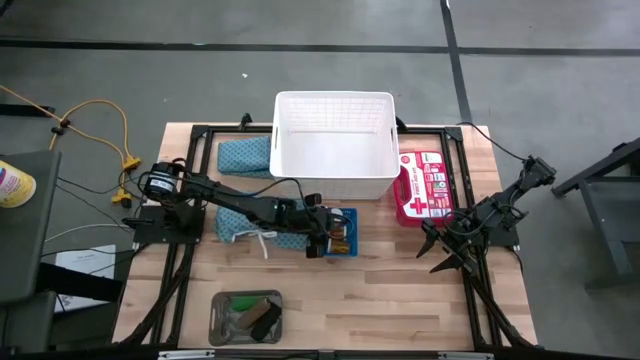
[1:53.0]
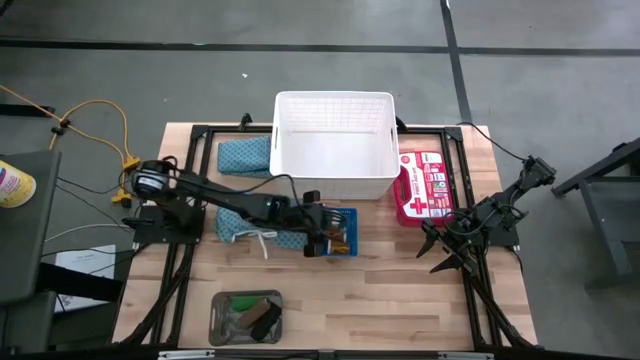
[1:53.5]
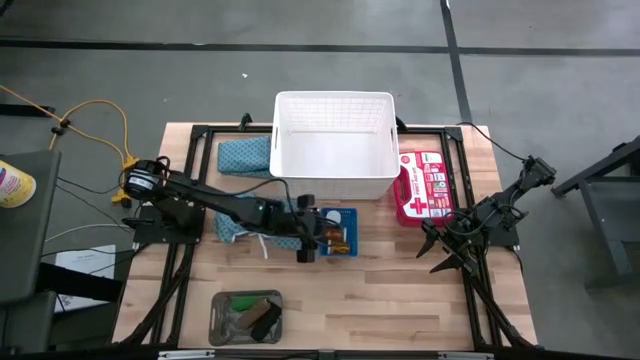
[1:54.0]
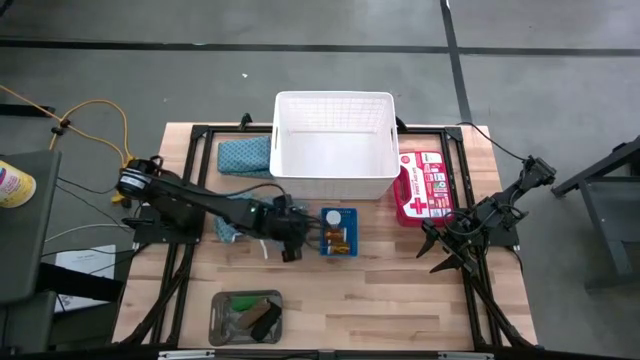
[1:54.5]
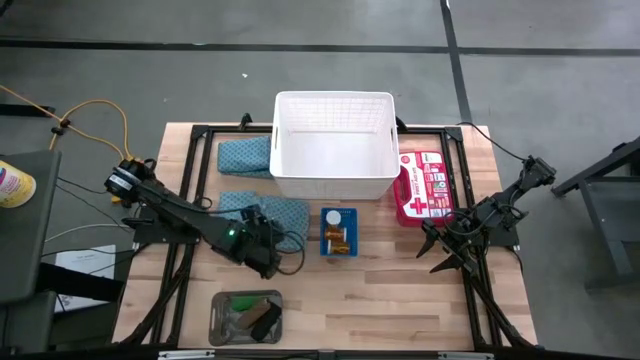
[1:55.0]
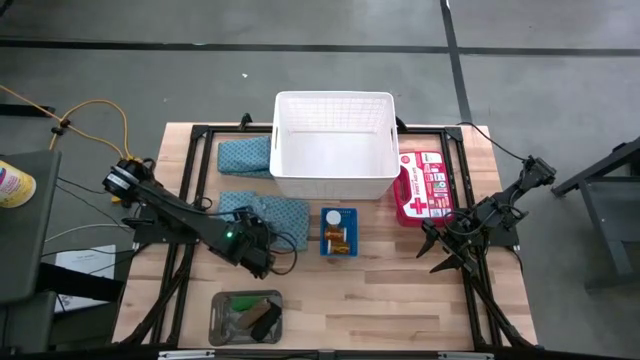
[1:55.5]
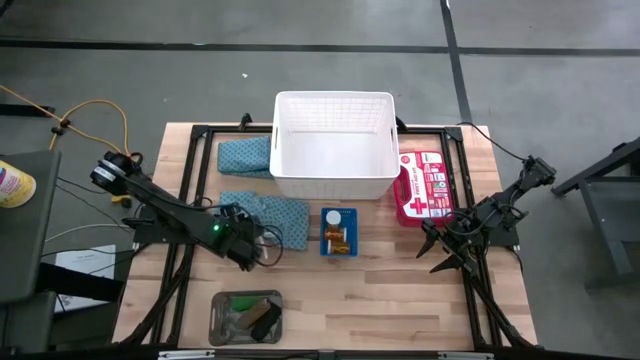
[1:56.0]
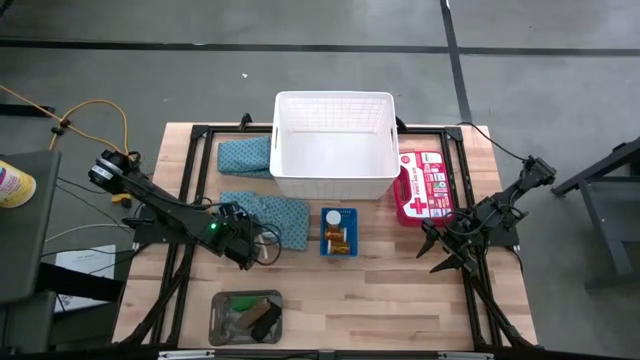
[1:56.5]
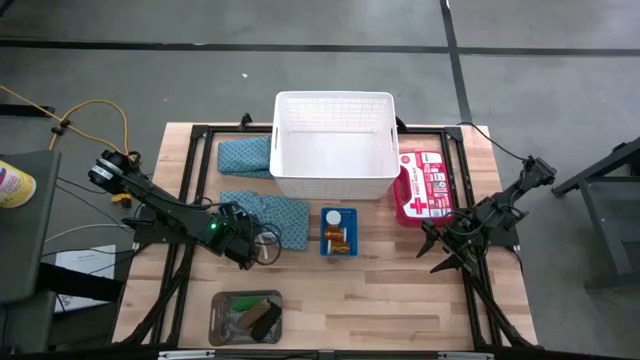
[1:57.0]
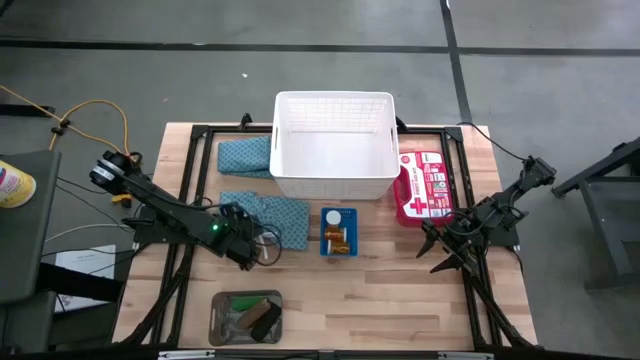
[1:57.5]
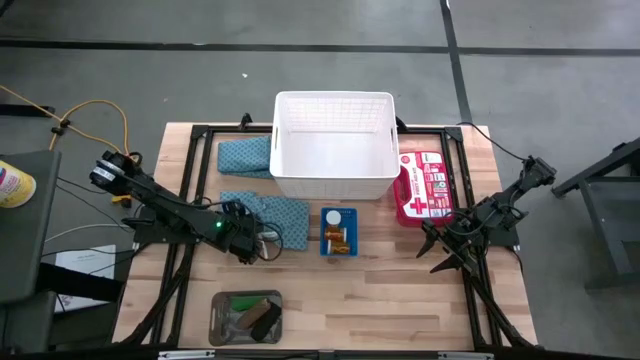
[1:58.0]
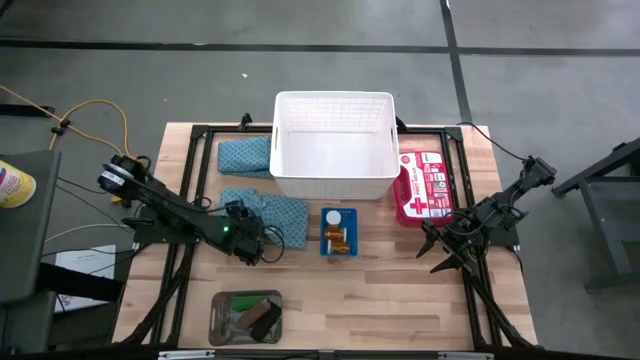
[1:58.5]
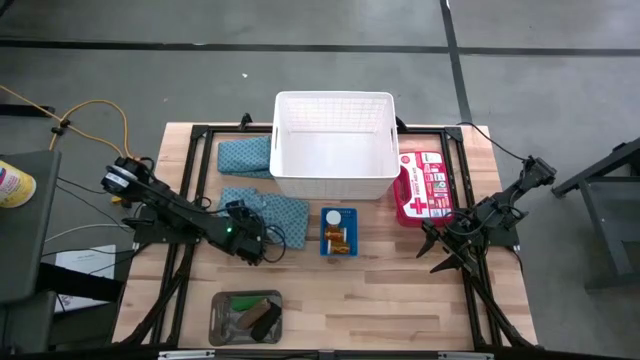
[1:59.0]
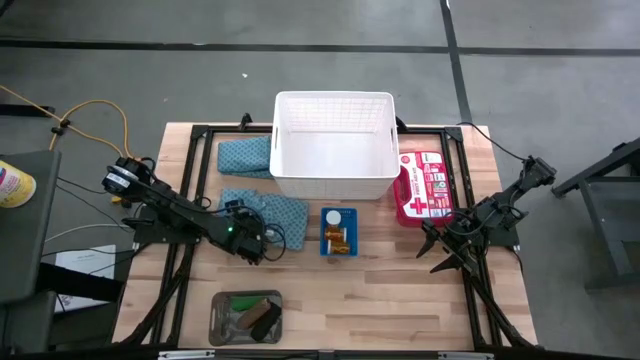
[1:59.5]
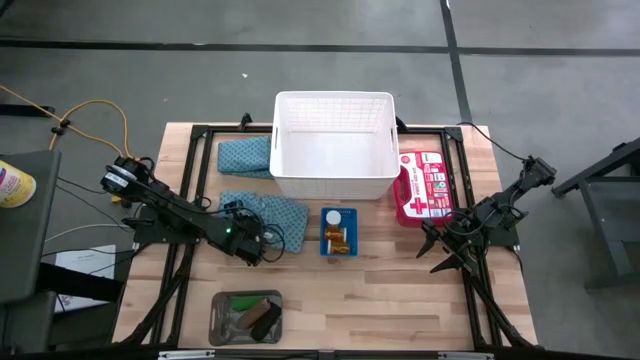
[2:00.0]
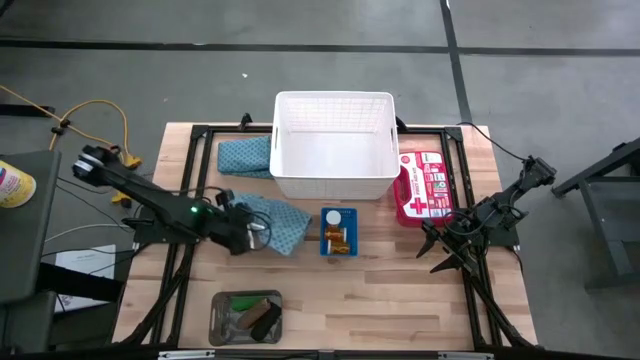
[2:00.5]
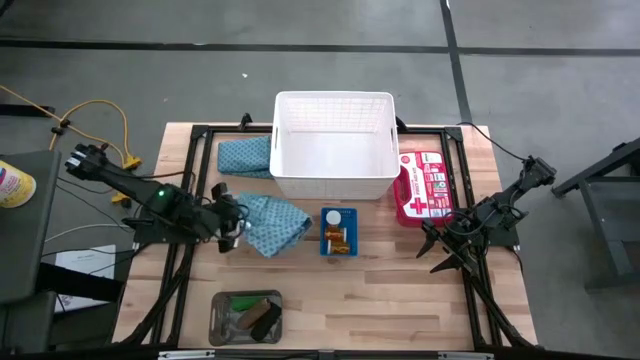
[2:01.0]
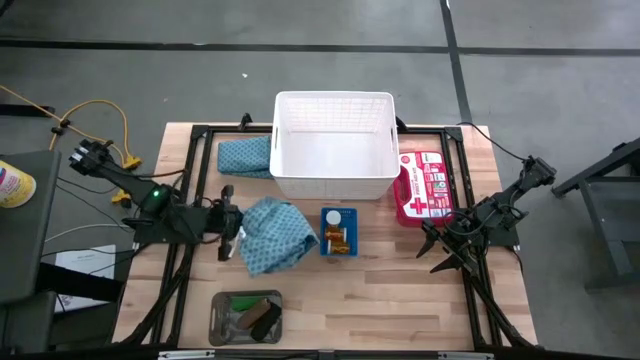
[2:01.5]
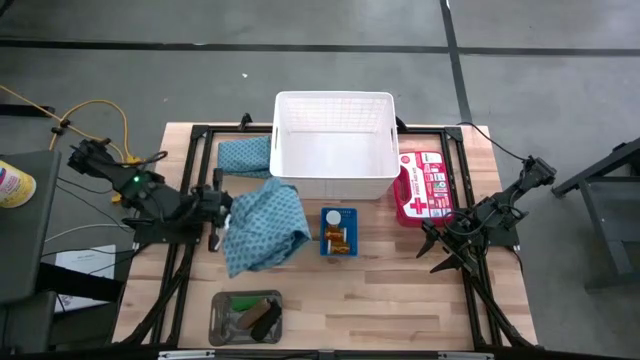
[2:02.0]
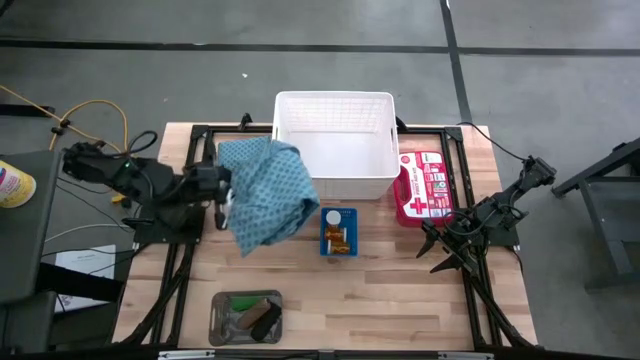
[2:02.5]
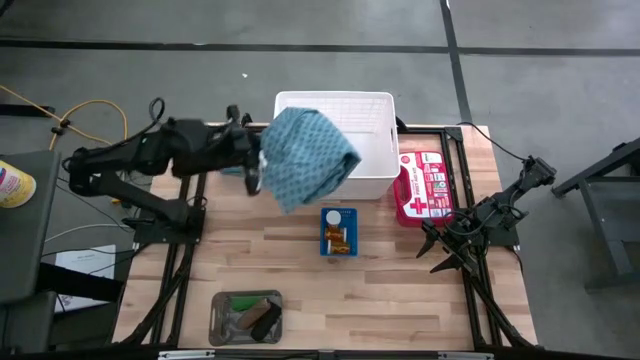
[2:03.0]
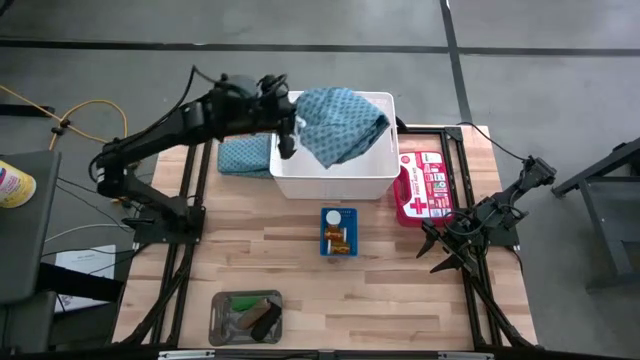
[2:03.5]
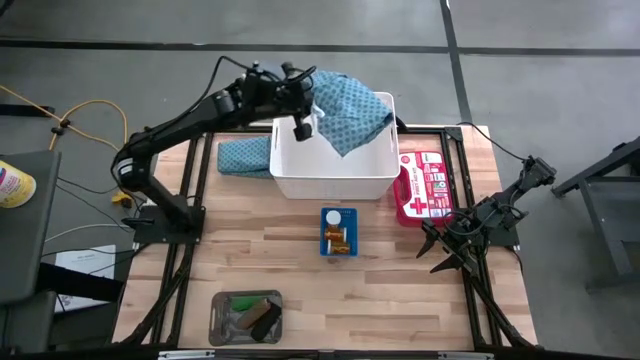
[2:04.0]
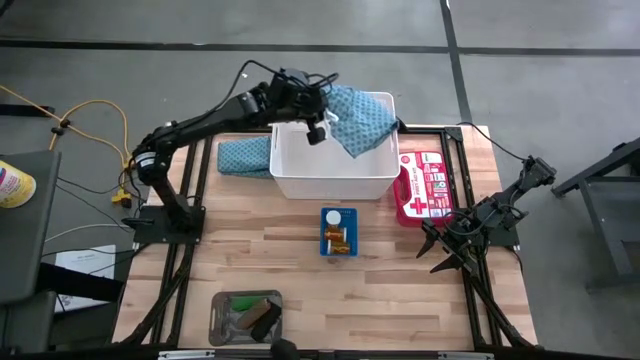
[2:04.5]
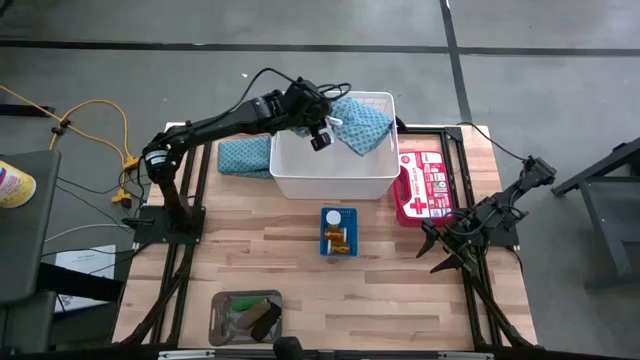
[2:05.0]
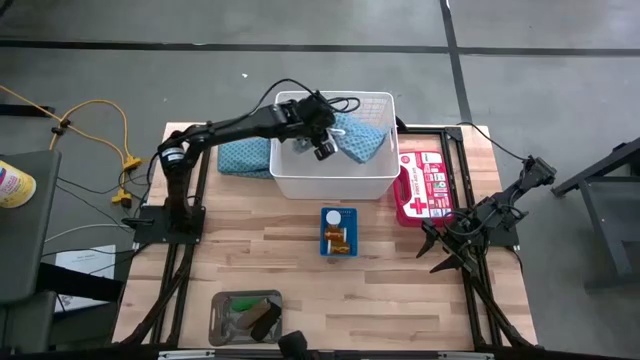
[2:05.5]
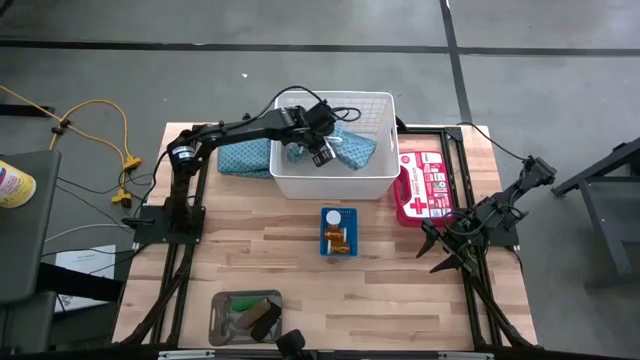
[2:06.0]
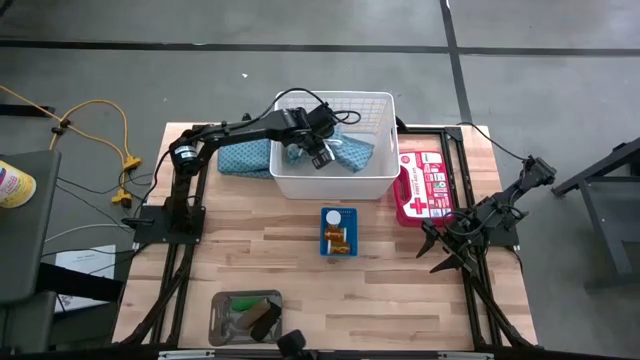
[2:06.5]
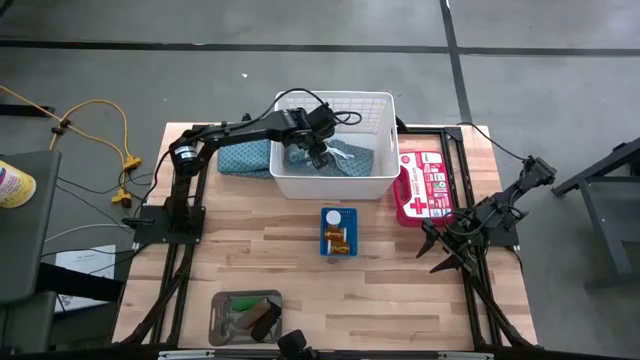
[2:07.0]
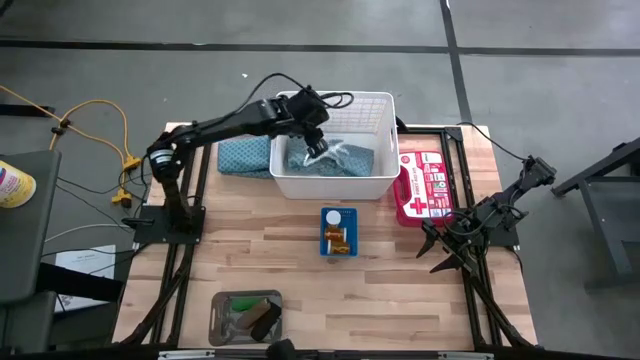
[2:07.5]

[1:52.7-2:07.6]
Task: Pick & place medical supplies in basket/bin
Put the bottom blue patient gown into the laundry organizer

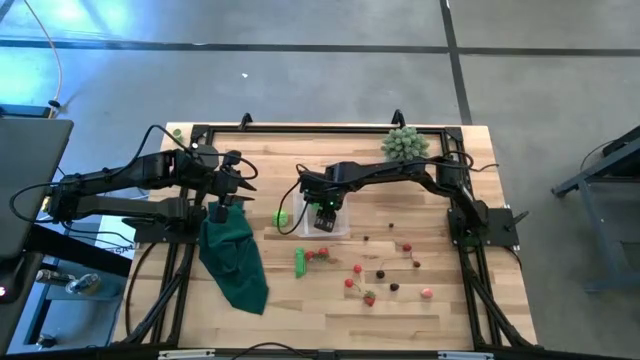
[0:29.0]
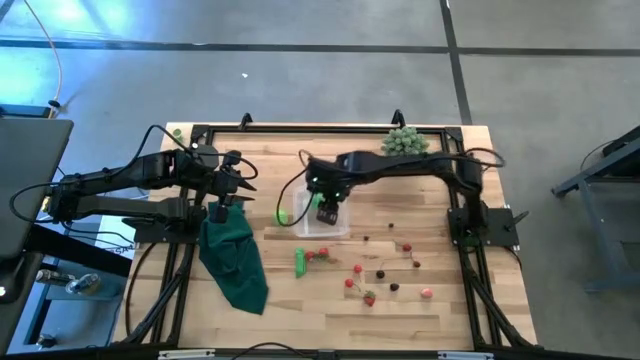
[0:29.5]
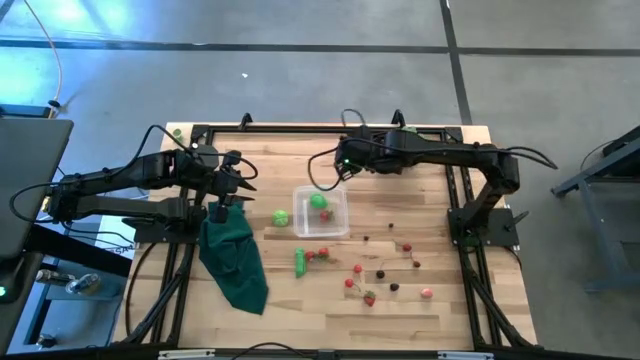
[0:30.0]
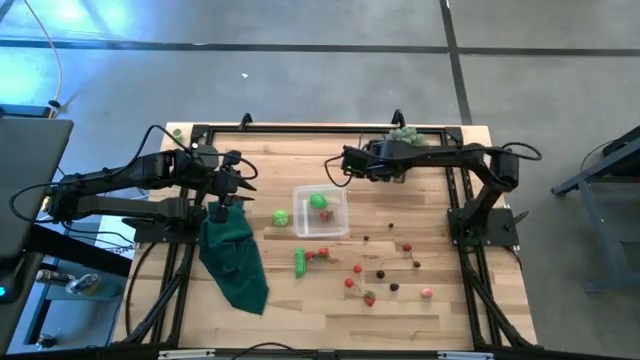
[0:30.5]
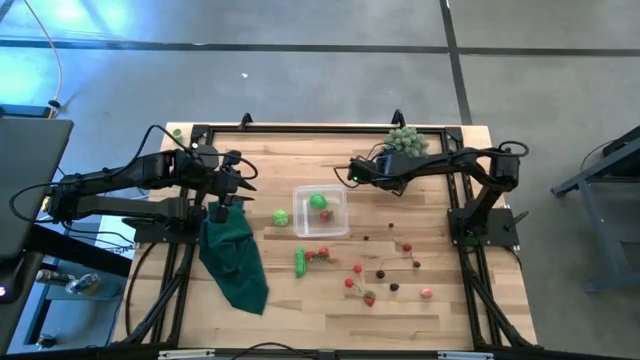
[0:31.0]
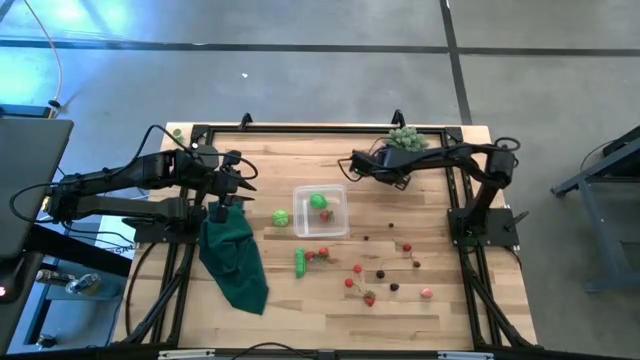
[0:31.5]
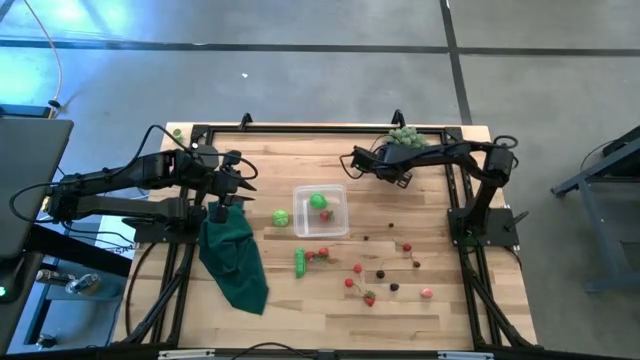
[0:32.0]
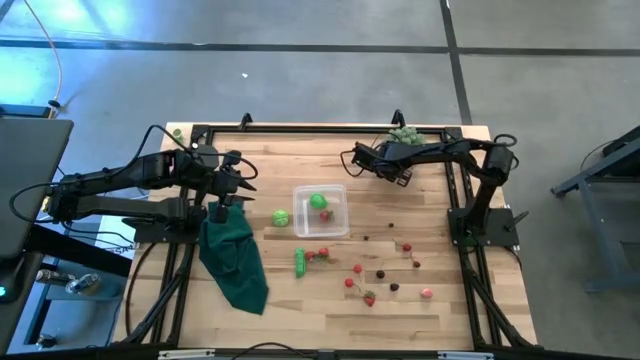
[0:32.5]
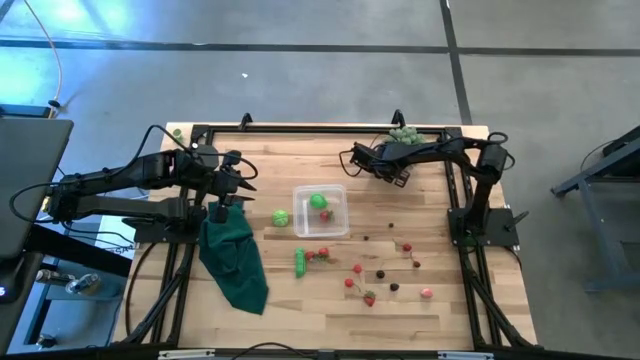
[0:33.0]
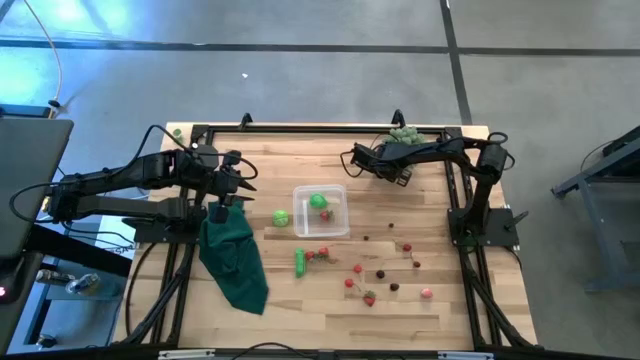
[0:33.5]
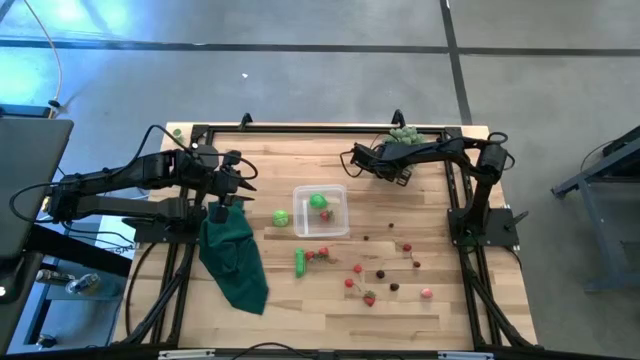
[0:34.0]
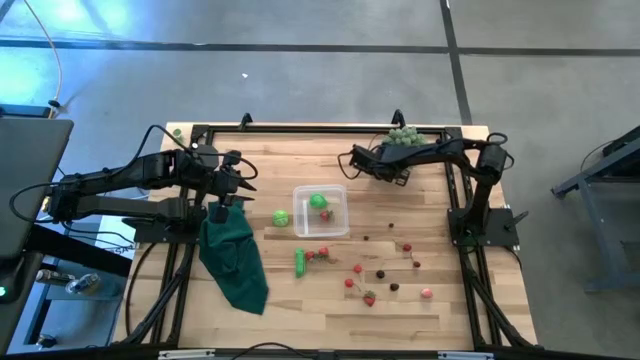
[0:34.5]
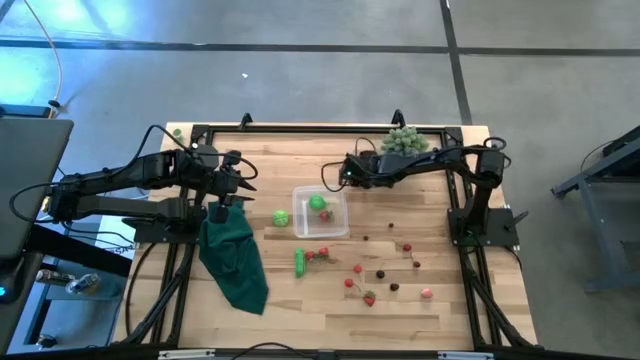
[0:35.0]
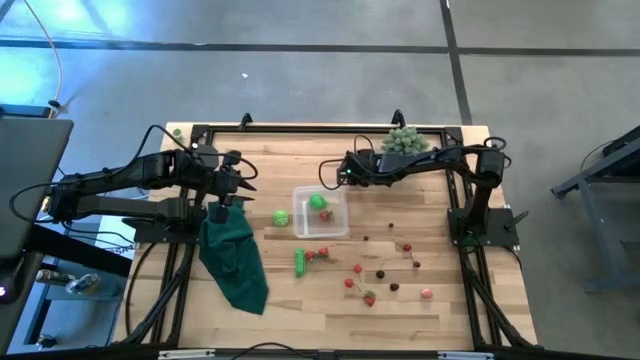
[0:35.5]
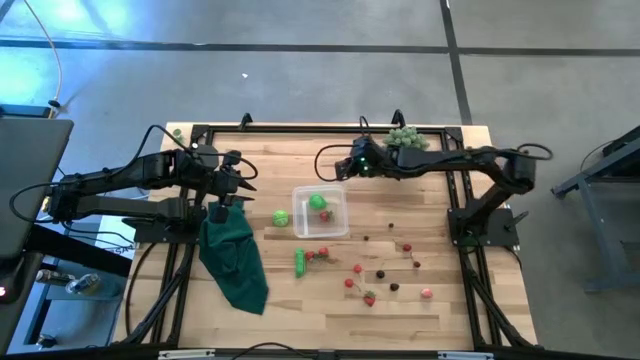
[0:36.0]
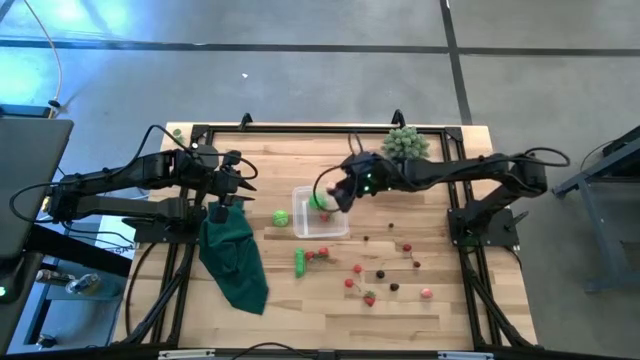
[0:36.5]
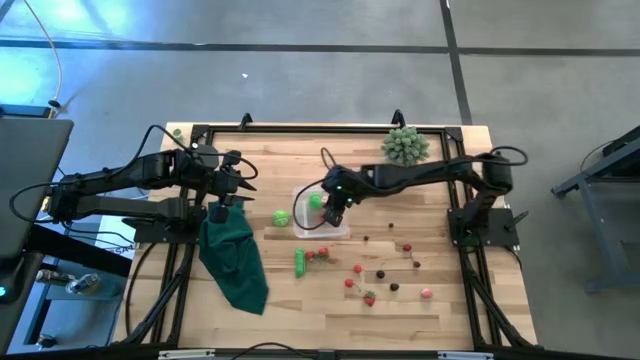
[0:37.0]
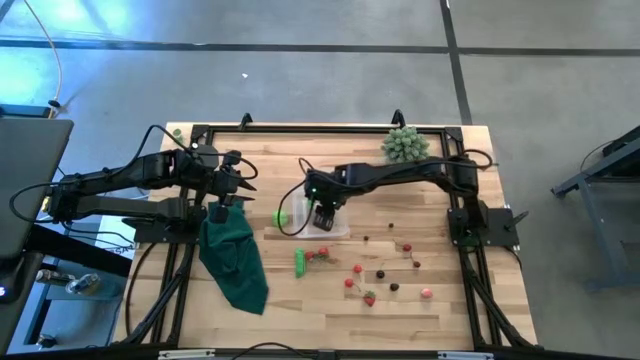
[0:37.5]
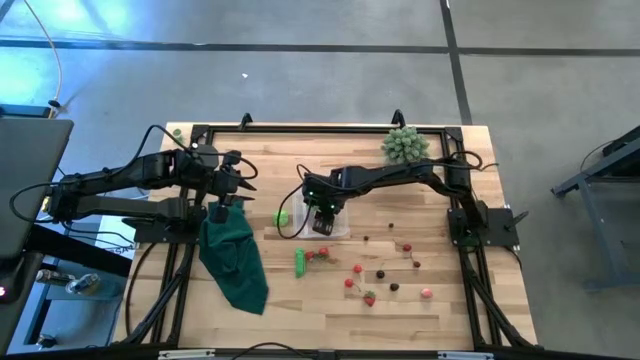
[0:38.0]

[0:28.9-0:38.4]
Task: Pick and placing Produce into tupperware
Put the peach into the transparent bin
